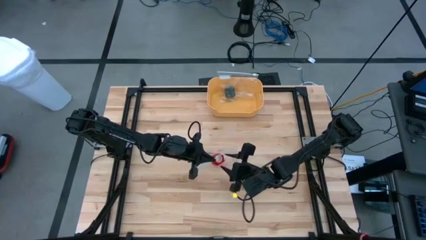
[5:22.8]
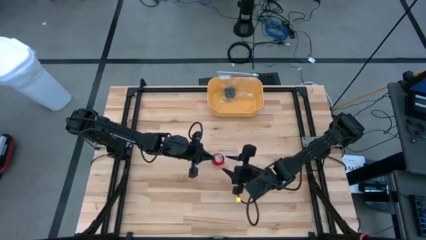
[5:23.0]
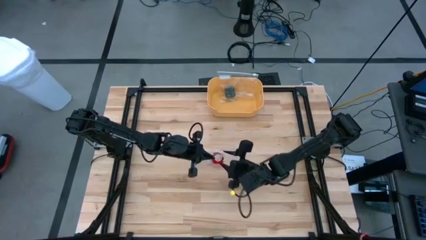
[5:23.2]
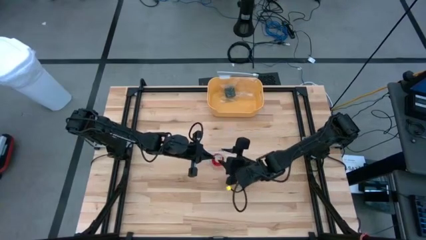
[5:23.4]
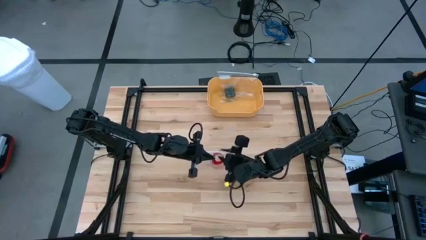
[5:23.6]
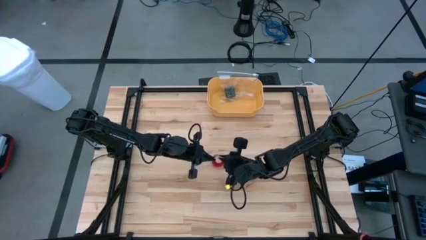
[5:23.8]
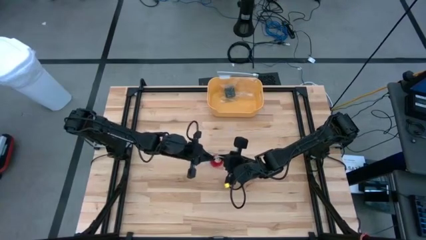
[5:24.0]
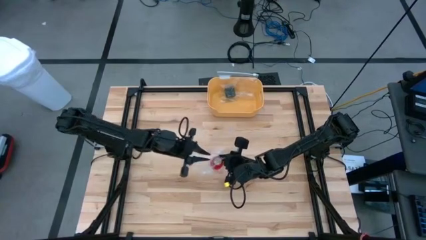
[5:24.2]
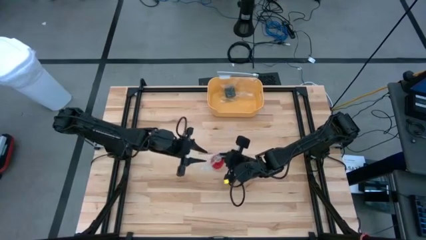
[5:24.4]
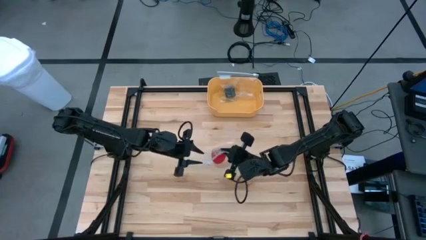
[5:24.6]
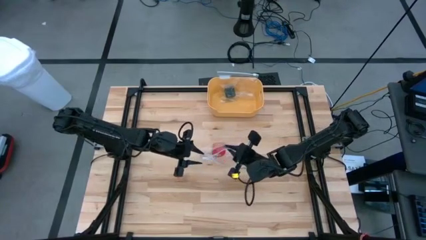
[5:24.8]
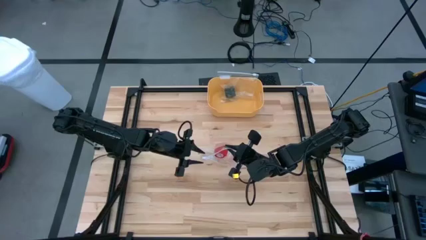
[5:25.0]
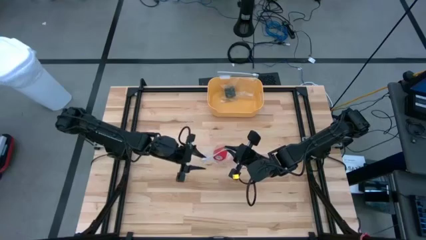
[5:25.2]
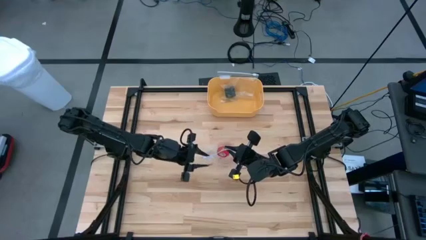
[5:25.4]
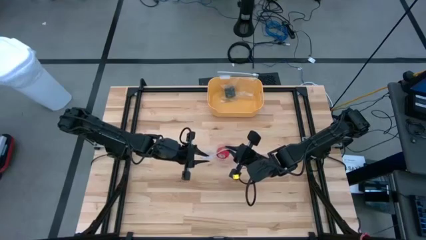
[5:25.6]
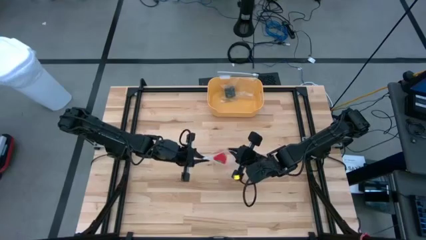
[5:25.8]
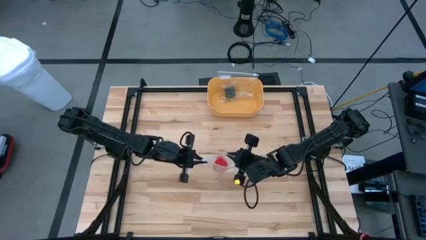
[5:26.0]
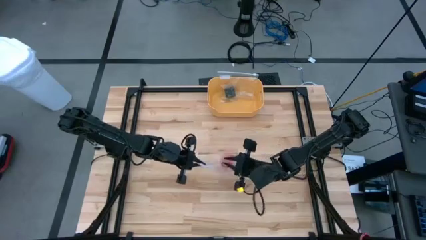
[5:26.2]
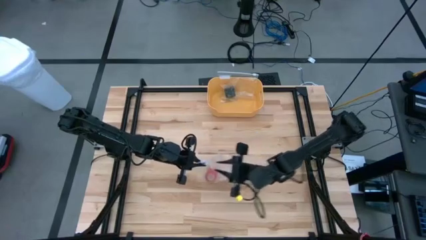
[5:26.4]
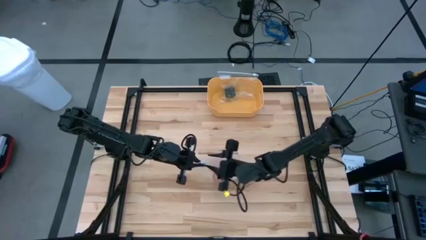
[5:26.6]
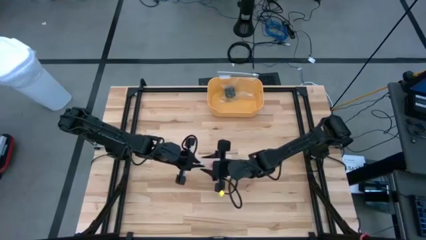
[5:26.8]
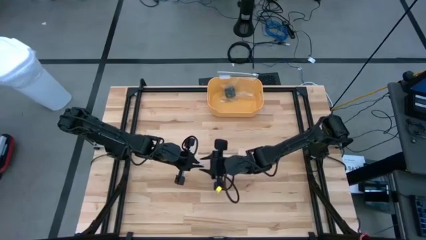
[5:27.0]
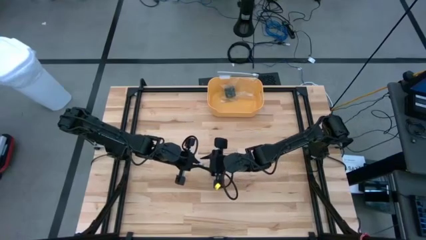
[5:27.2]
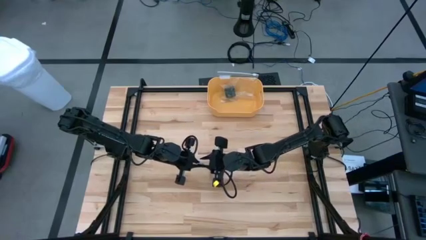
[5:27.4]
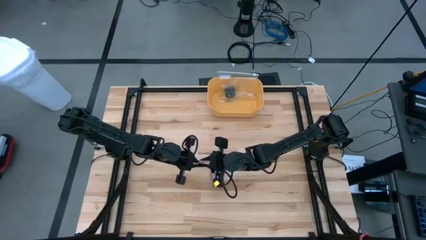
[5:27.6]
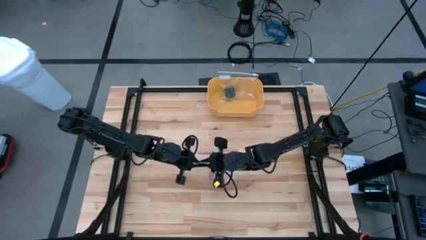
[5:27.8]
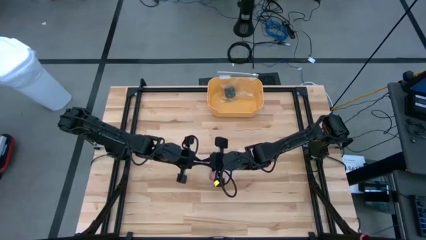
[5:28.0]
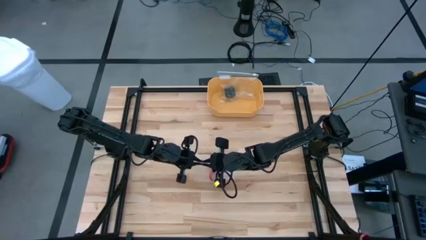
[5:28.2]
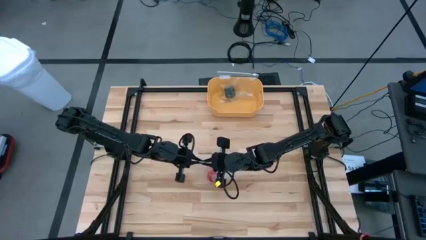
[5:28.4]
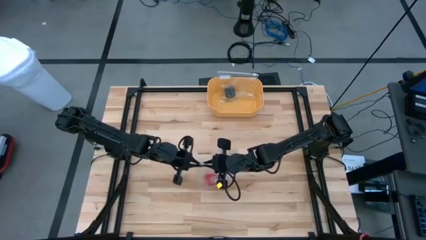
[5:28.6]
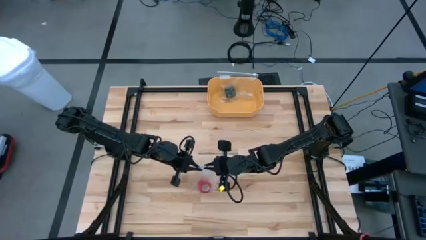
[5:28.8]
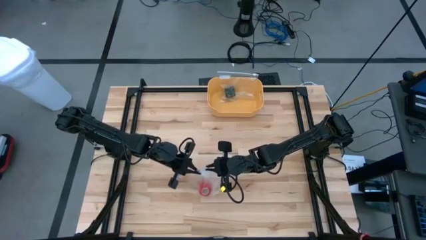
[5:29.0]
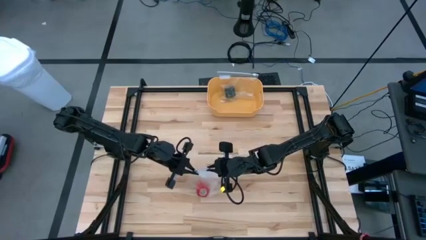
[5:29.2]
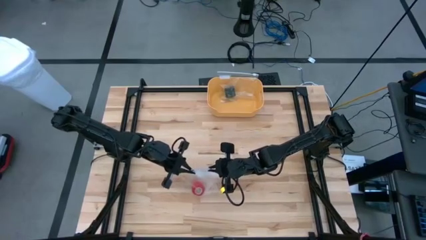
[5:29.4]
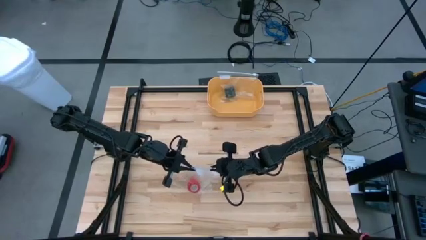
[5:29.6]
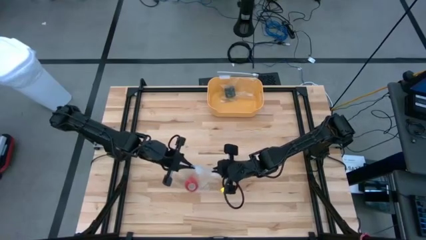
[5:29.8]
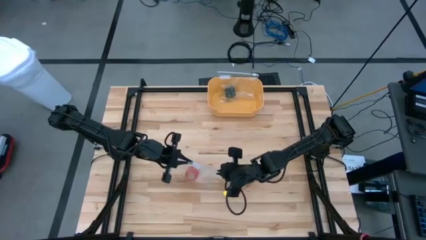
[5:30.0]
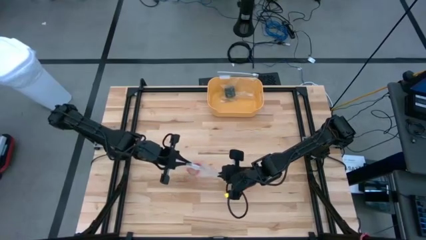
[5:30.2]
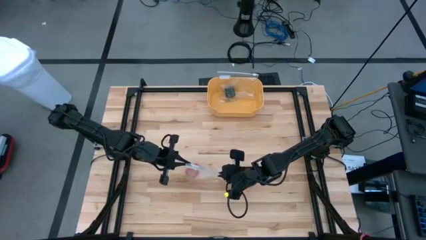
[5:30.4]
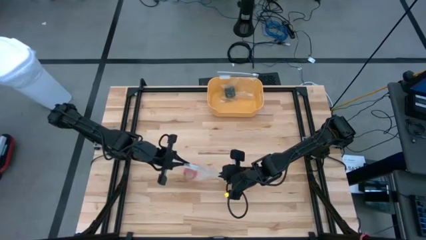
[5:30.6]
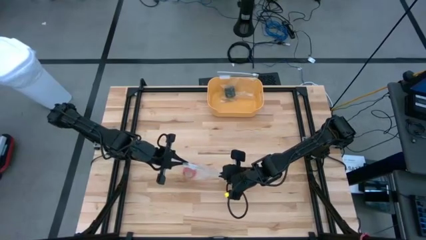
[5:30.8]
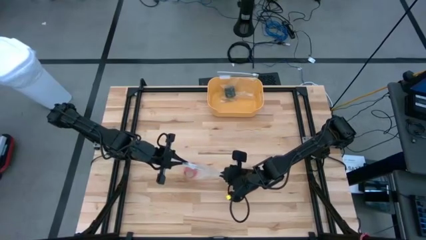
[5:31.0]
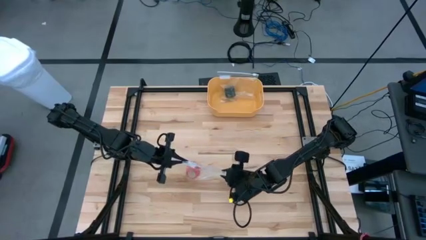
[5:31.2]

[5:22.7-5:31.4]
Task: Roll bandage
Close the transparent zip bag

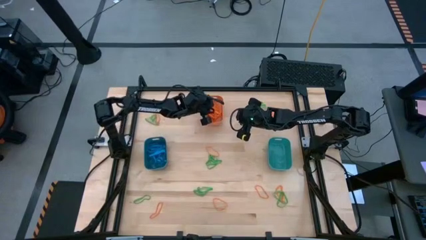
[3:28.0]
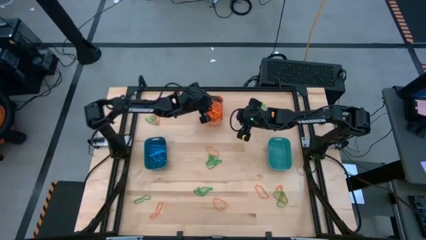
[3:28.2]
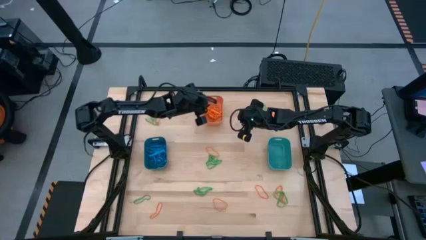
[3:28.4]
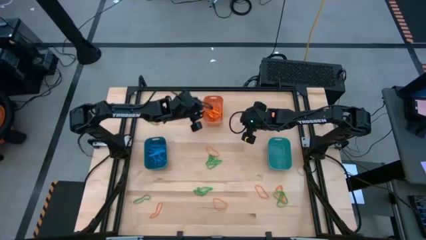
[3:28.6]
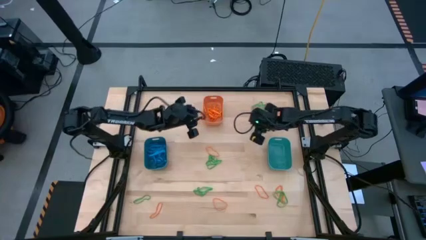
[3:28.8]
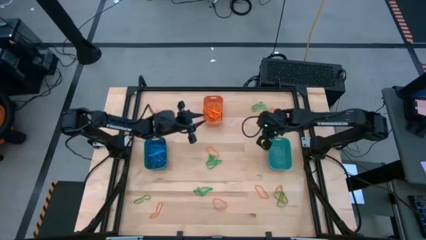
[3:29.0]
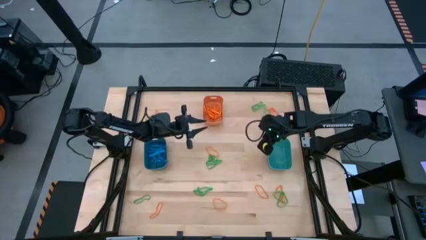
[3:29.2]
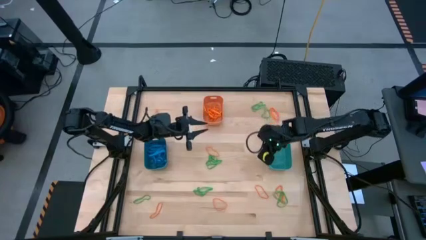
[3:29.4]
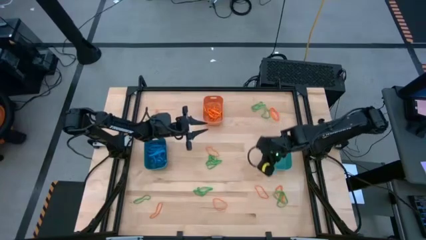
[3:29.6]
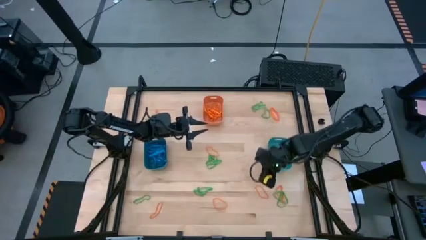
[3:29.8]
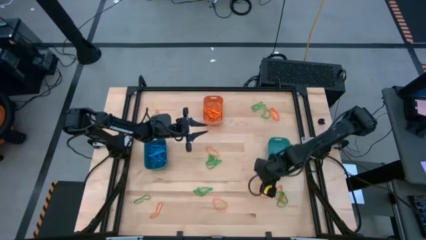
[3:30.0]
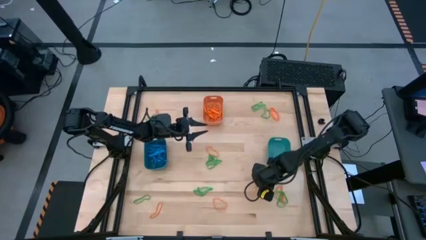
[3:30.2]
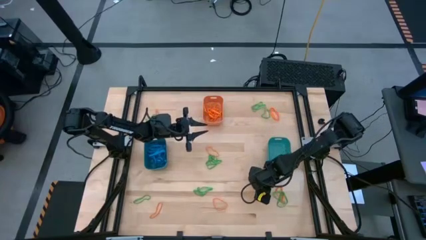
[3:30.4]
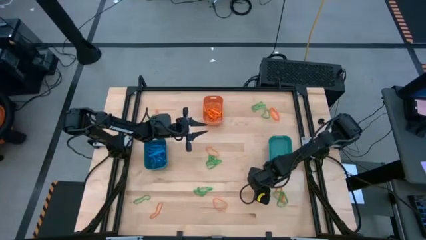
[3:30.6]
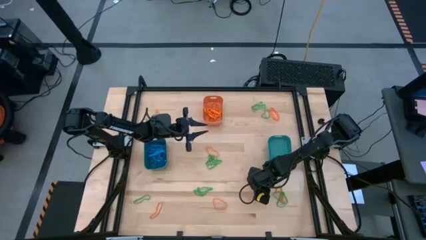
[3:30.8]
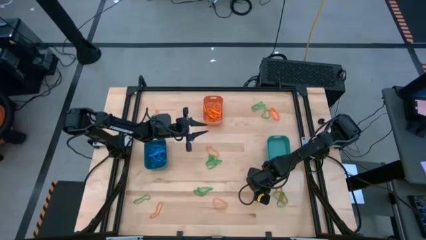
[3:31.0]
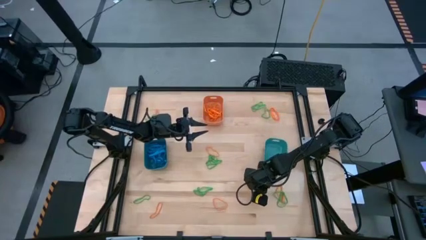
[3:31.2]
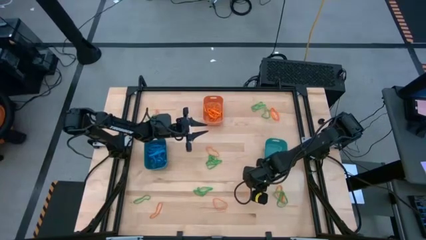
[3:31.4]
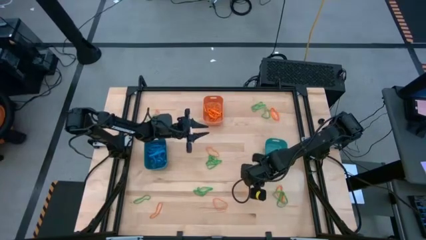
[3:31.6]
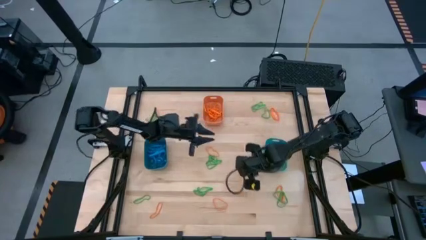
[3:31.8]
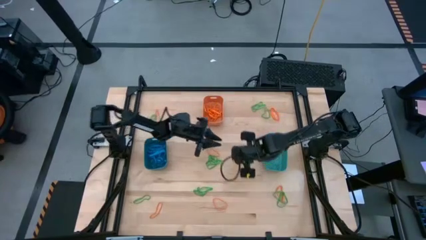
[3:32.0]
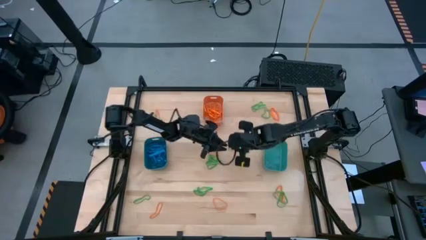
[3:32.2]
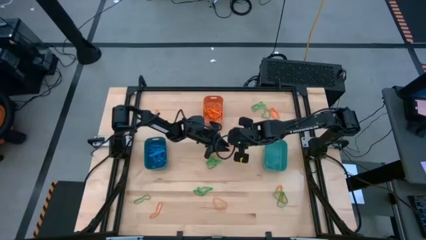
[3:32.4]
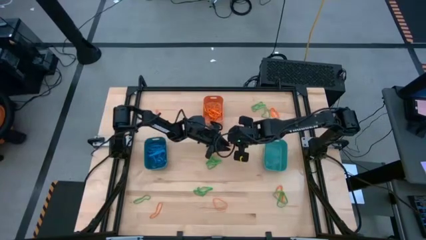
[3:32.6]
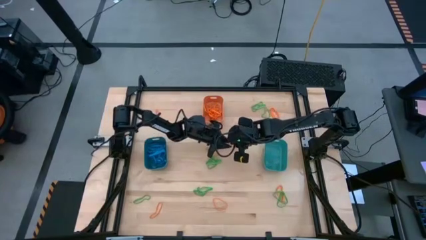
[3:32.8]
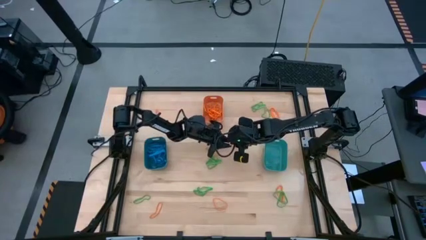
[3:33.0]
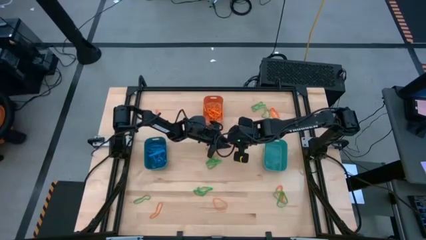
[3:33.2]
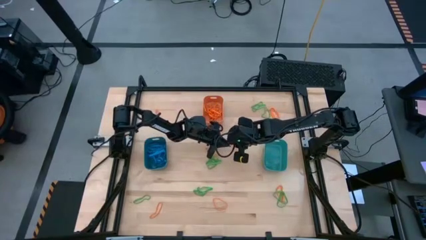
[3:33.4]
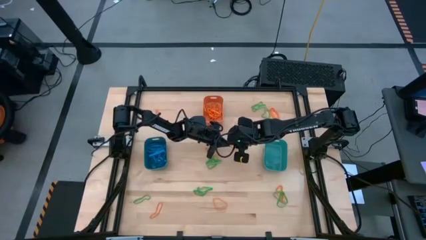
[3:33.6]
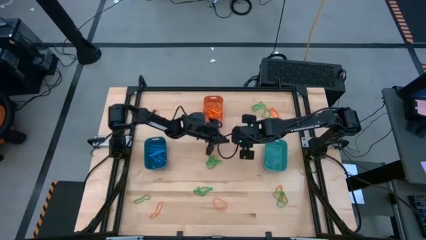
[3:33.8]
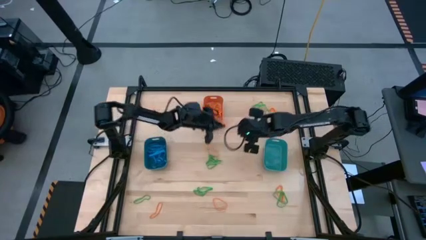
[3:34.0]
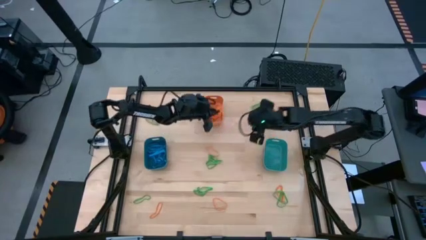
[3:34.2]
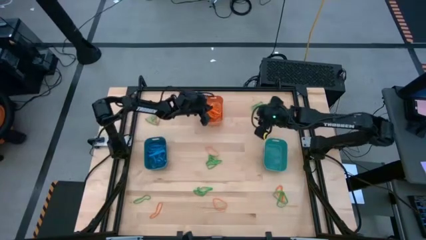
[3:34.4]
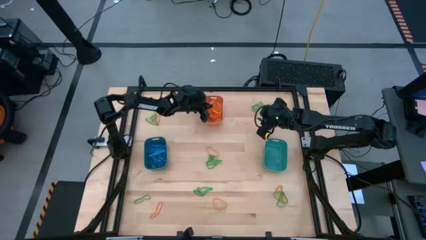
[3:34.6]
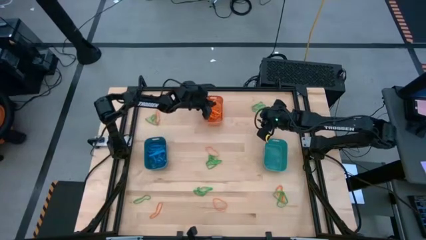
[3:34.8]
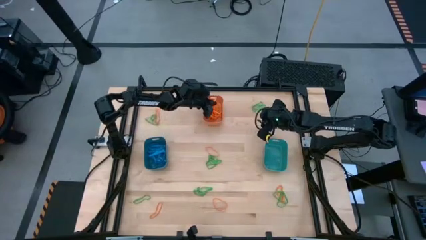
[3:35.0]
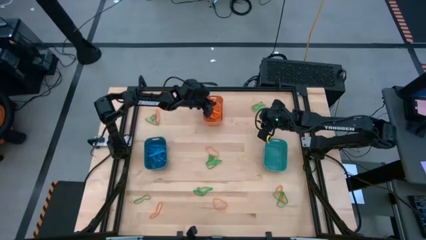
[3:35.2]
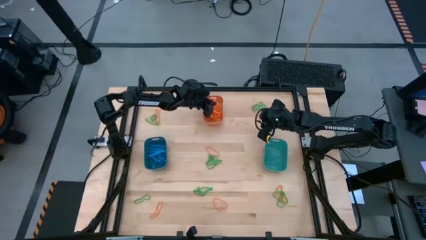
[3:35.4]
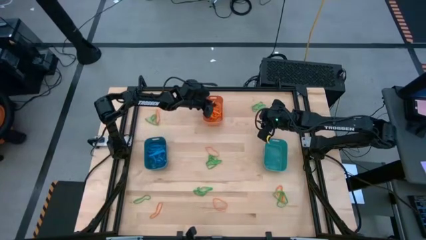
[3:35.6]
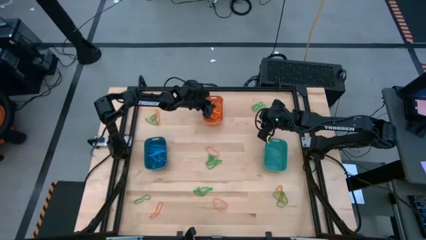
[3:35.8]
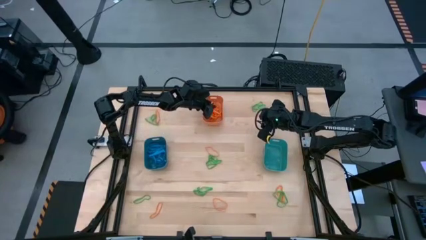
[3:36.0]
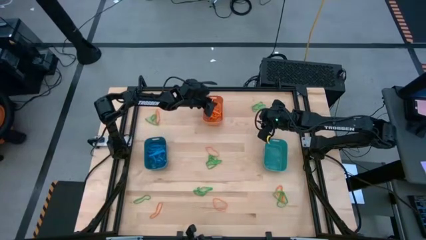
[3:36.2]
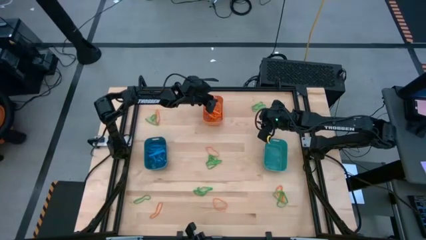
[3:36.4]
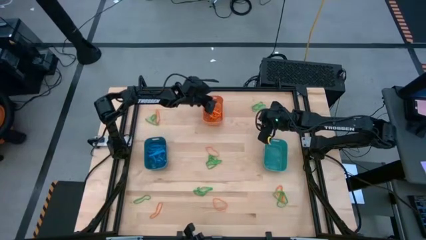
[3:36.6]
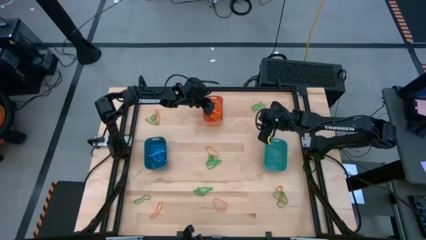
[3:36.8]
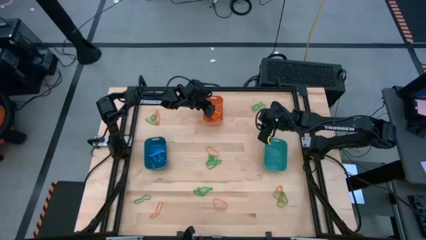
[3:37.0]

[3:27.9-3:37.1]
Task: Sort rubber bands into baskets
Put the orange rubber band into the orange bin
